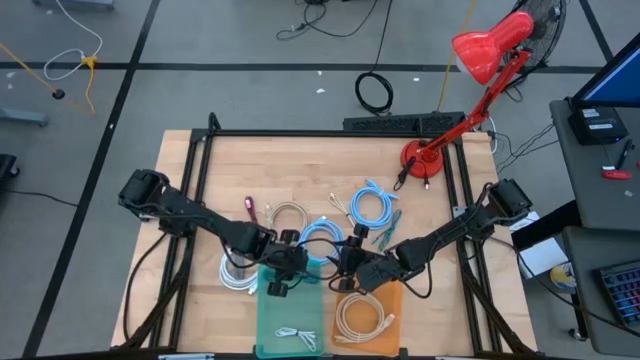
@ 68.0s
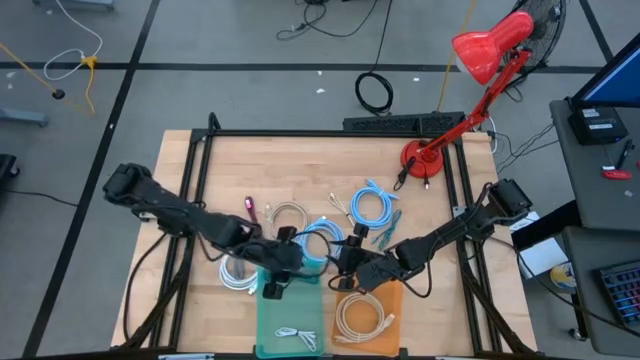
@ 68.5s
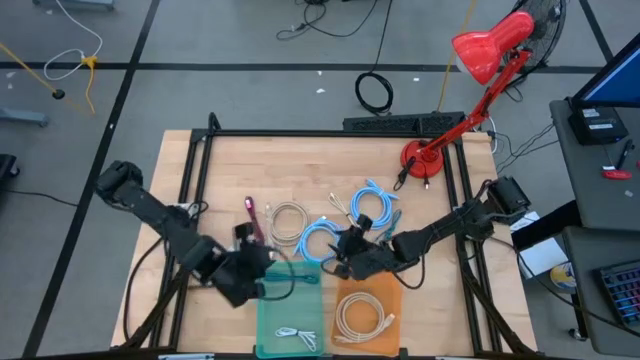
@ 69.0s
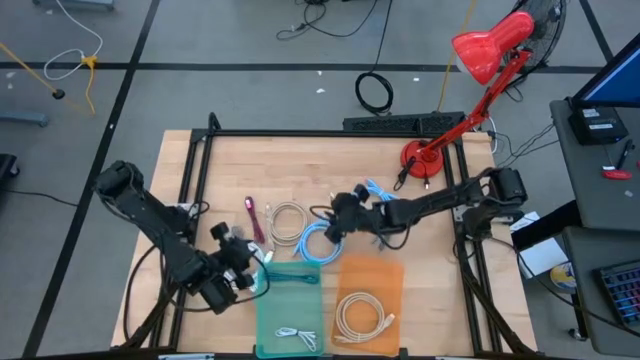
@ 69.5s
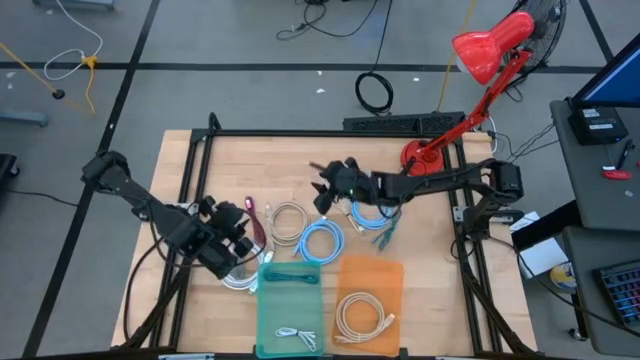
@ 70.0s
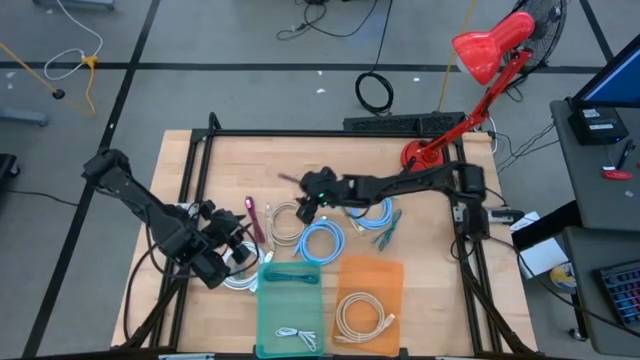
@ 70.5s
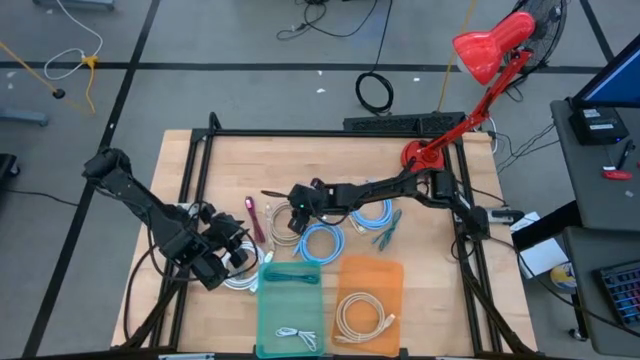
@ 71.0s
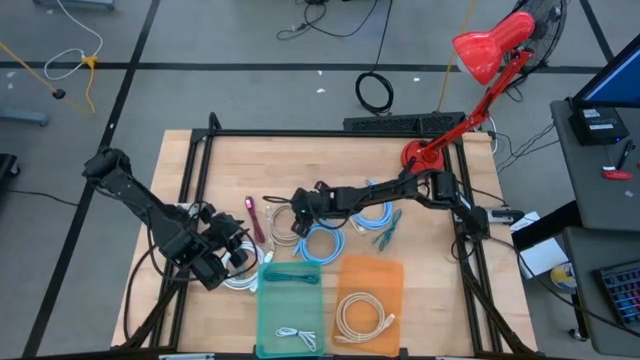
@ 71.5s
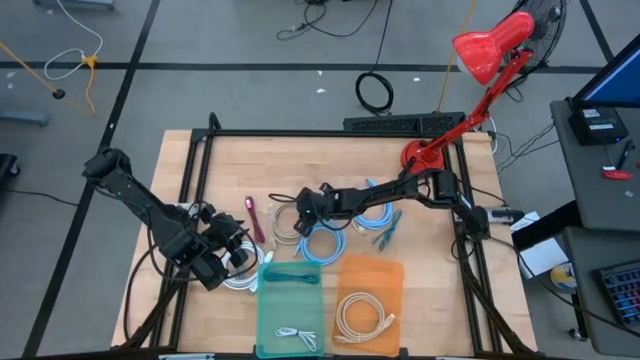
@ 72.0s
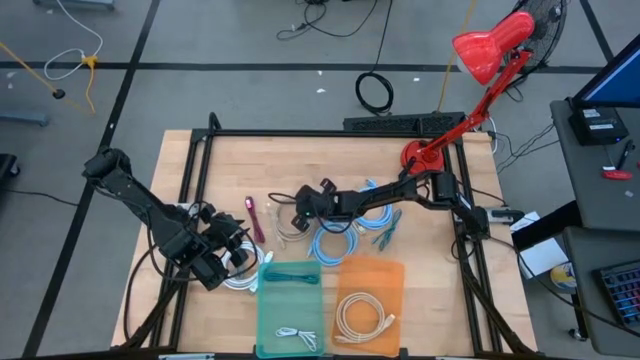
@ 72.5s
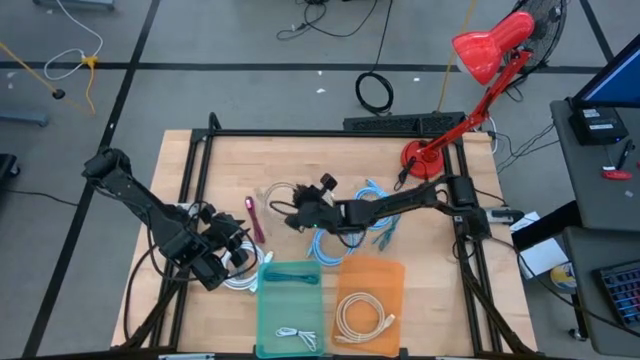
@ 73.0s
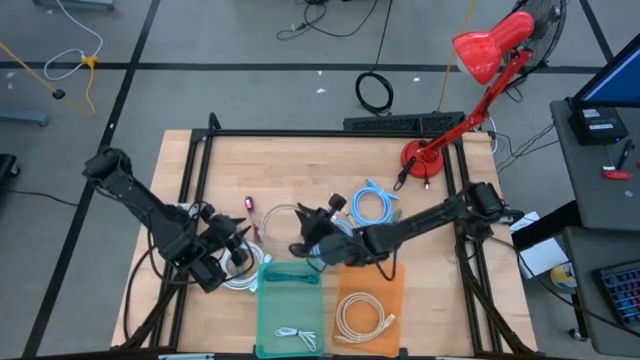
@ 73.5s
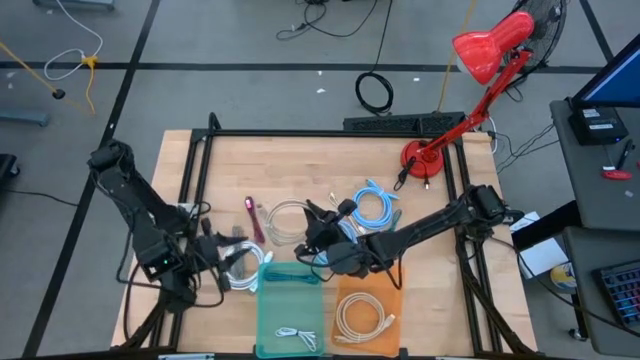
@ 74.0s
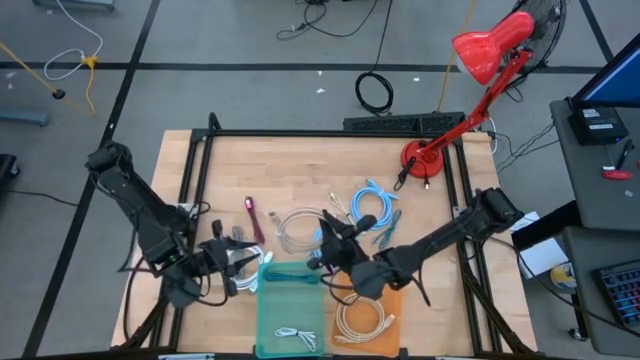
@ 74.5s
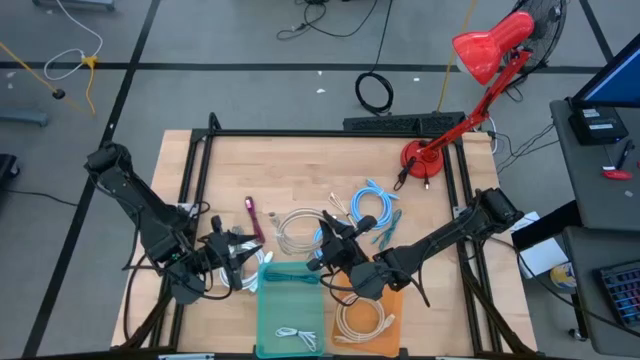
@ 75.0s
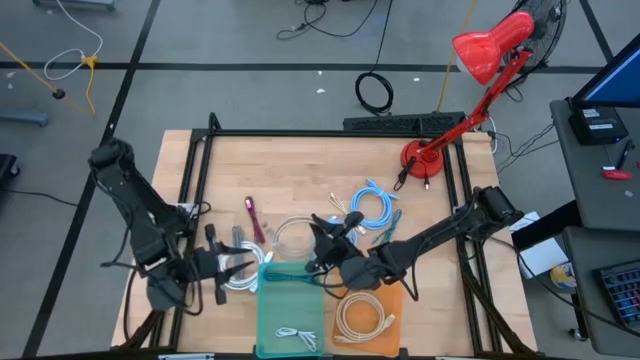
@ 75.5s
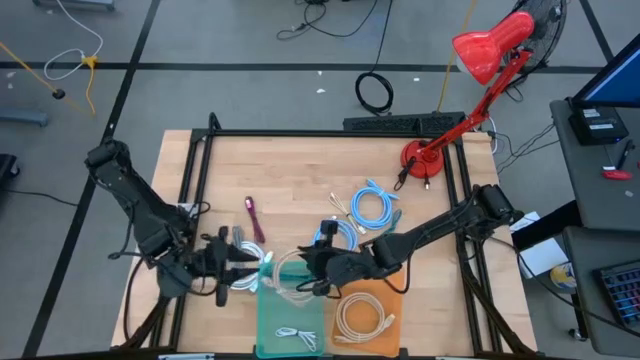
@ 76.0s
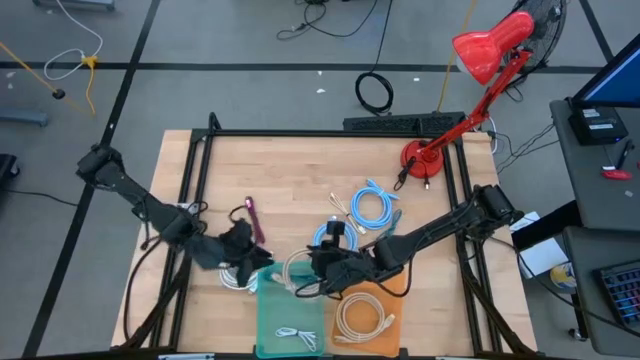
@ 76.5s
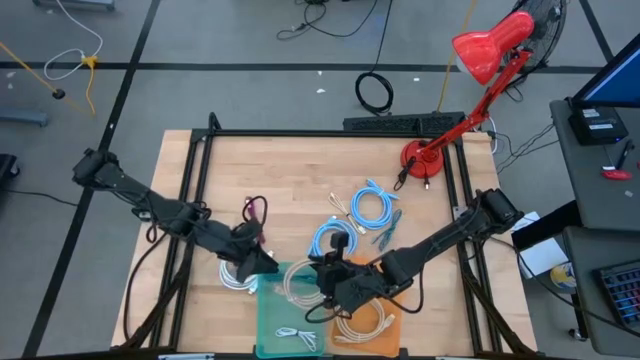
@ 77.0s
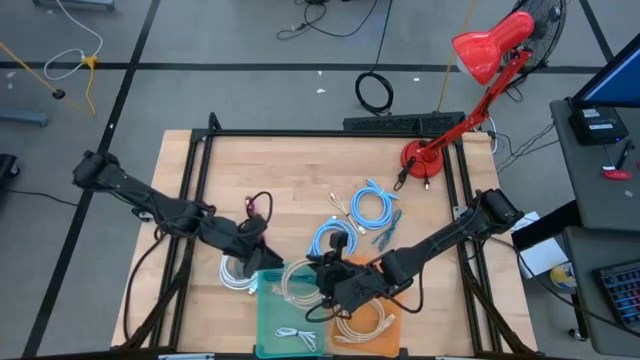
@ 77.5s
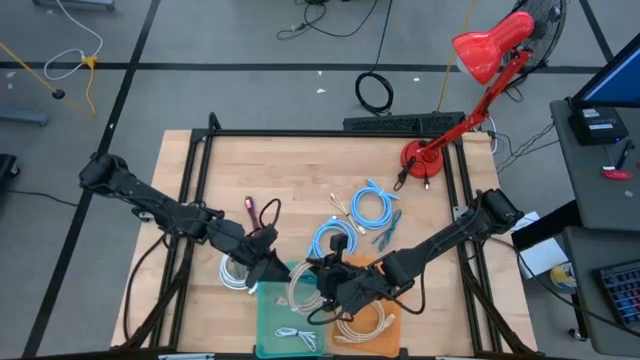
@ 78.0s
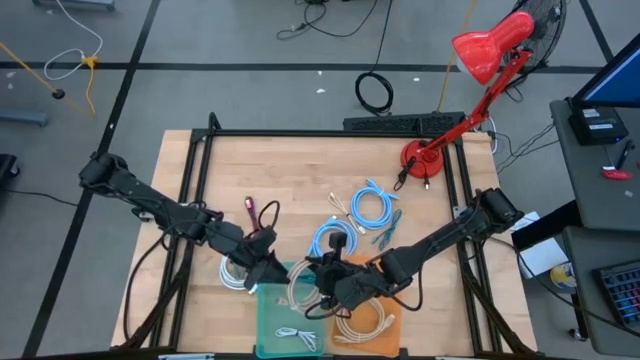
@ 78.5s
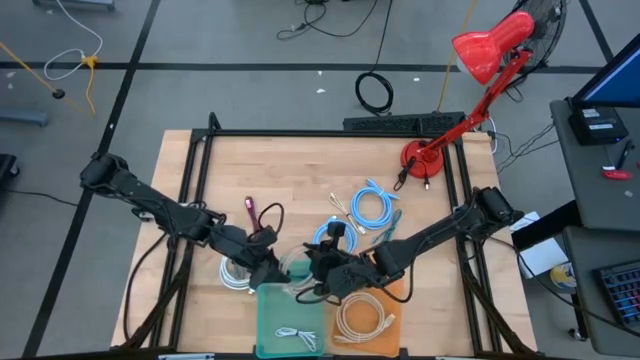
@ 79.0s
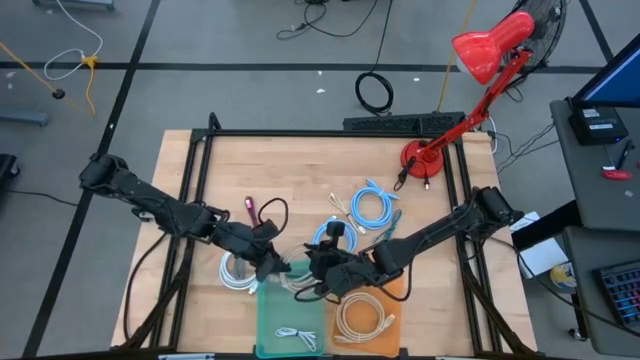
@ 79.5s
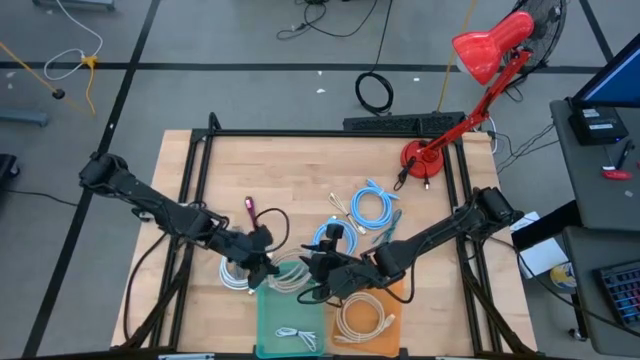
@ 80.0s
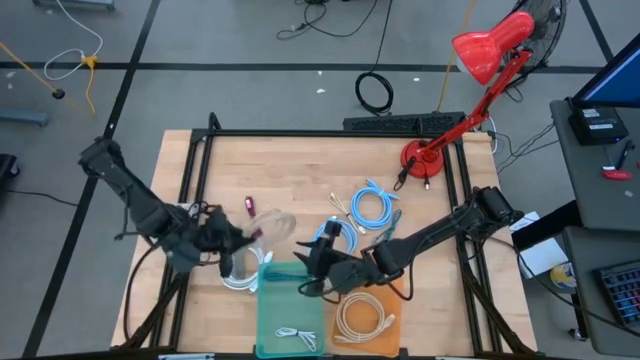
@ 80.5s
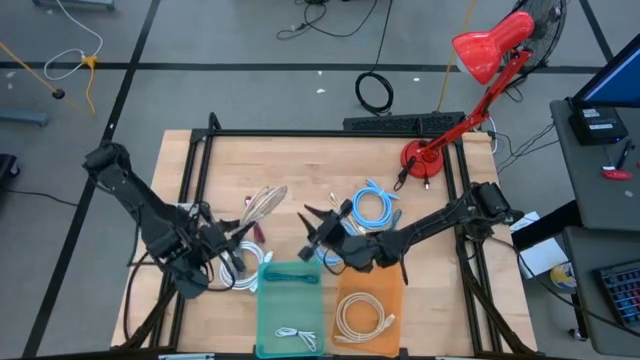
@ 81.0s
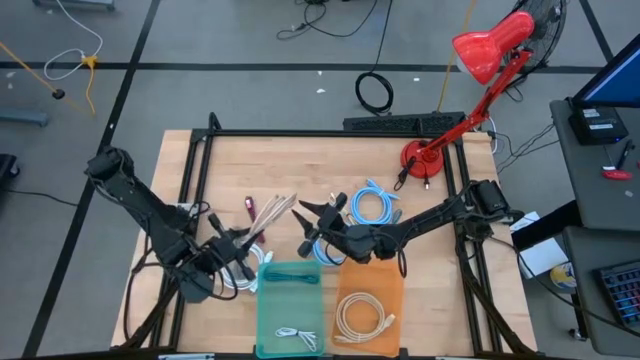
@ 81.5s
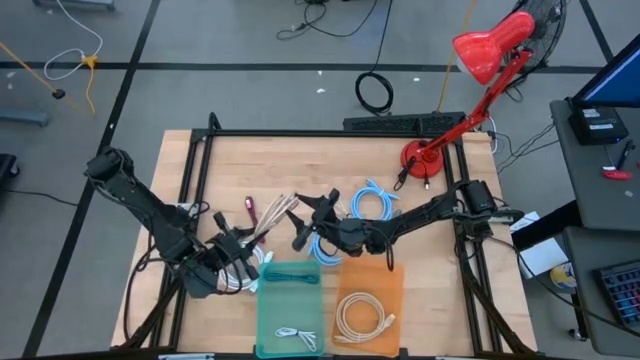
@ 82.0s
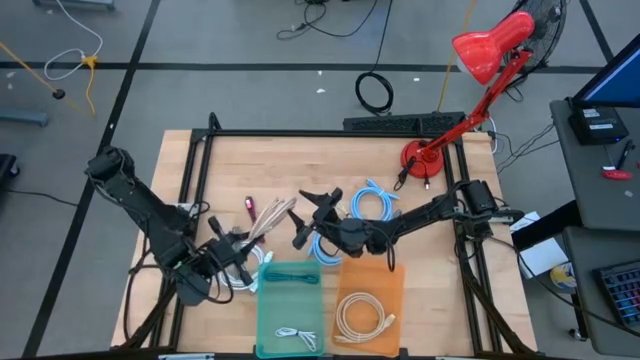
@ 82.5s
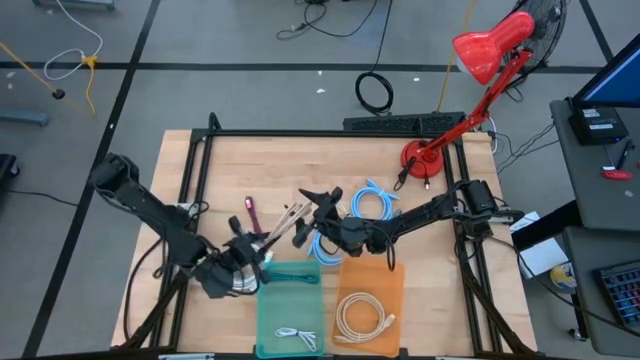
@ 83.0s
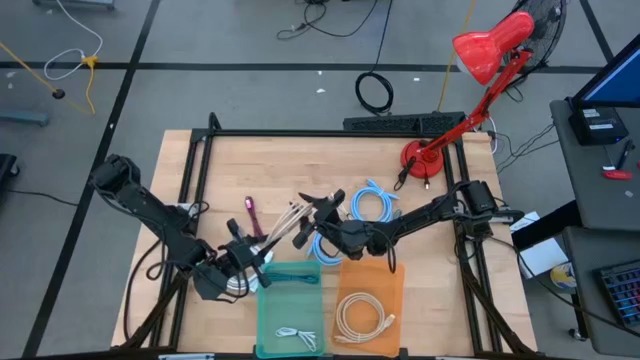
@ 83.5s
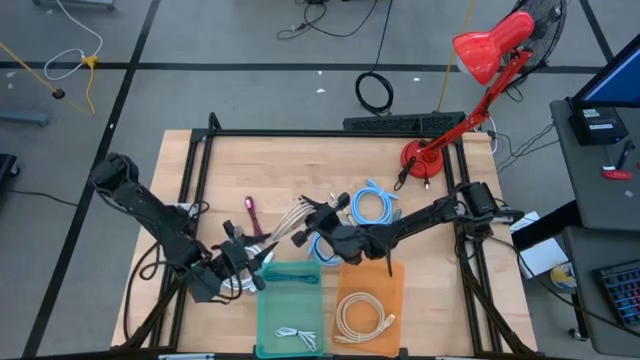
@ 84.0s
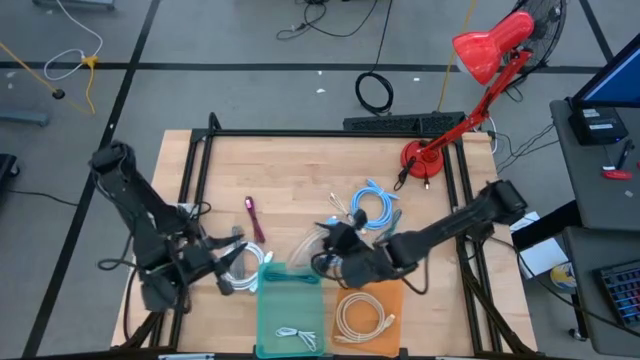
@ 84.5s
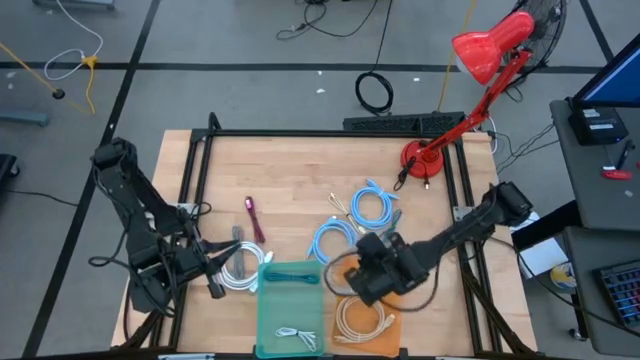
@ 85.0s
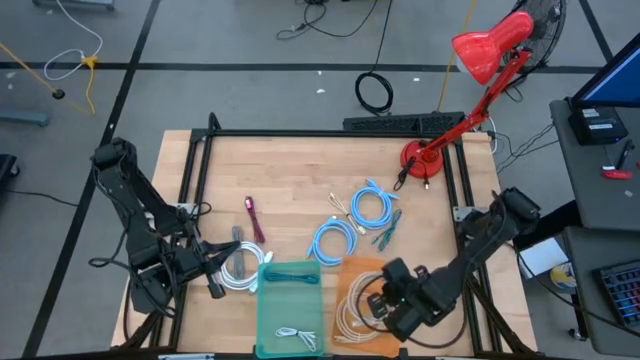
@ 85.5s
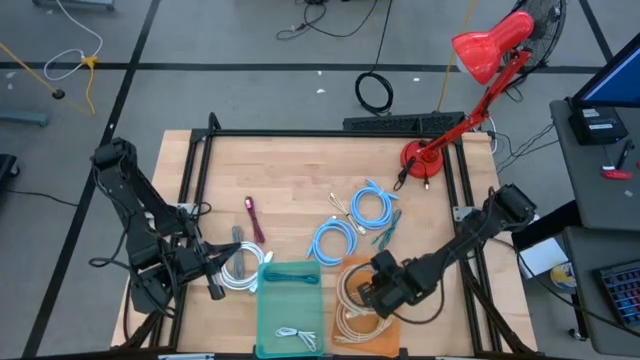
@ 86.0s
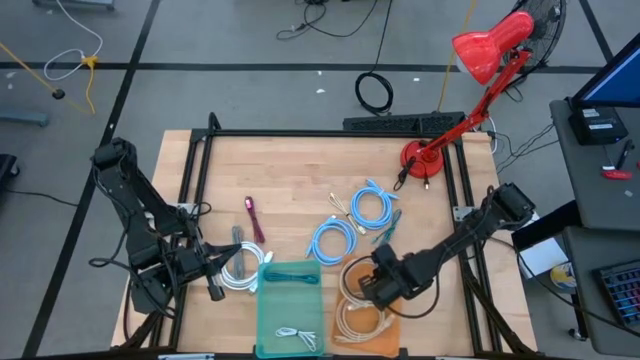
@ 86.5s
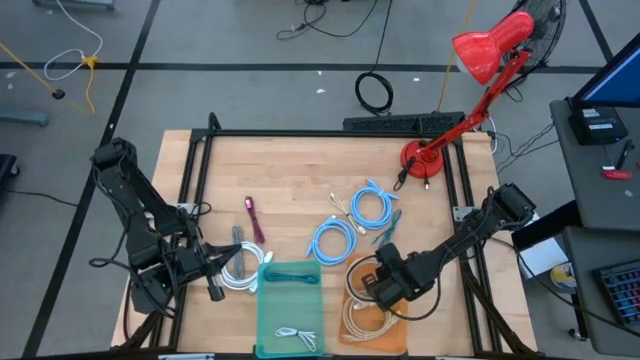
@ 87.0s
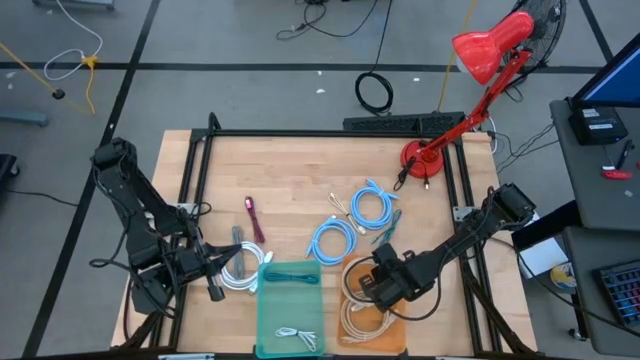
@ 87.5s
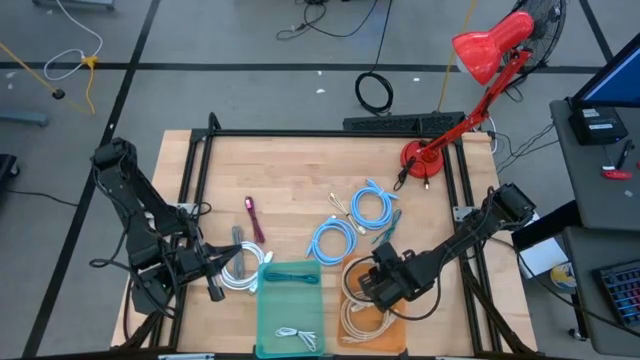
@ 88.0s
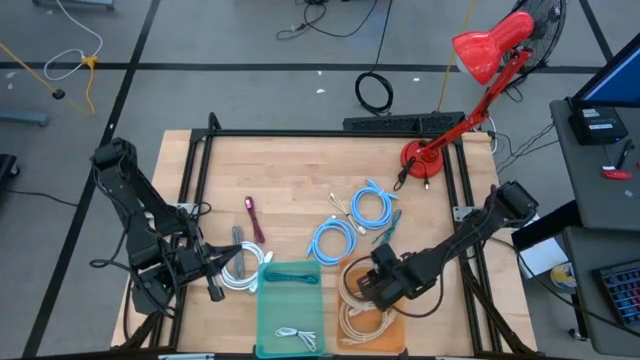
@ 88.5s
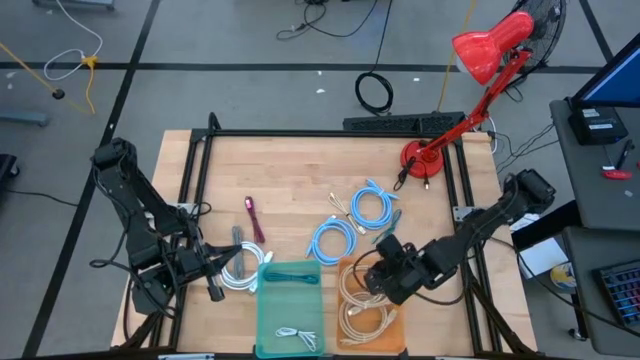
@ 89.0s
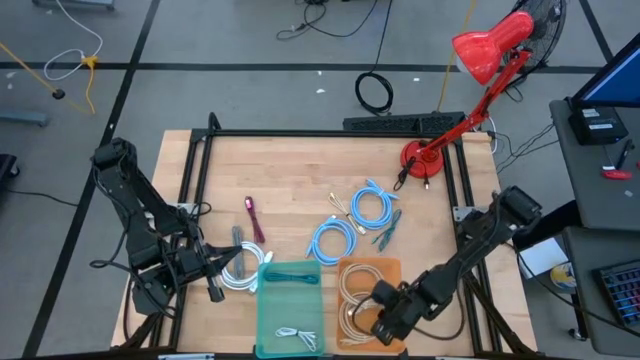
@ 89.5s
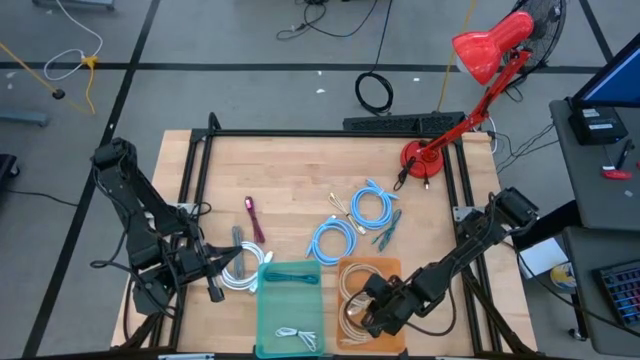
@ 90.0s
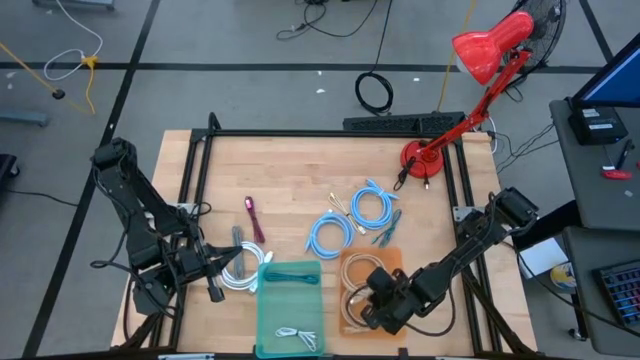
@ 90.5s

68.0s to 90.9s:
Task: Pick & Place USB Port
Put the gray video cable into the orange bin

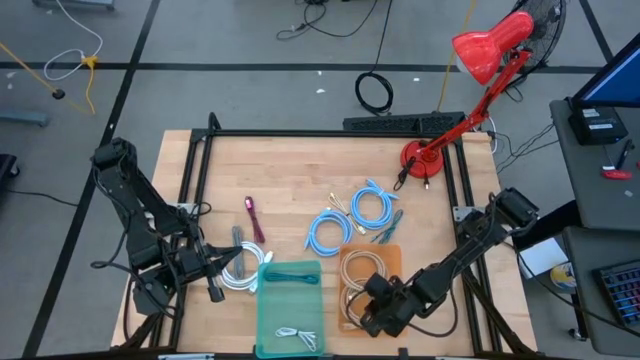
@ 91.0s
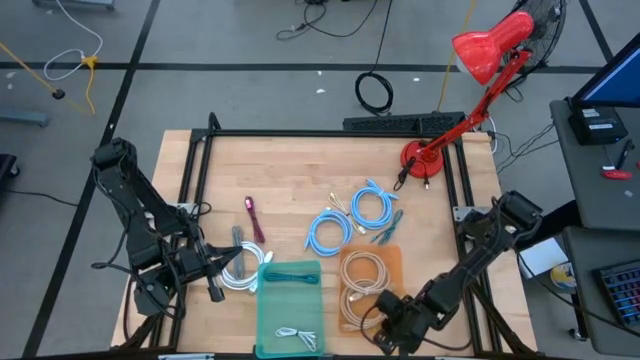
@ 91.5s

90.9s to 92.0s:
Adjust the orange bin
